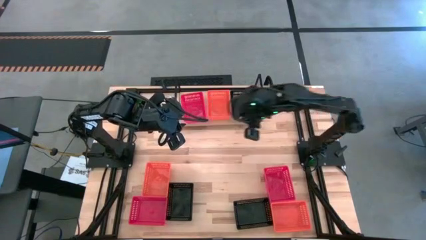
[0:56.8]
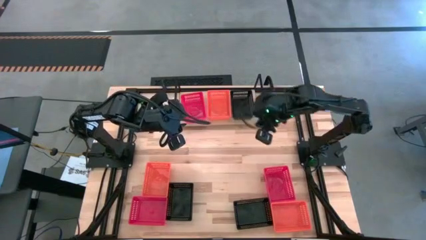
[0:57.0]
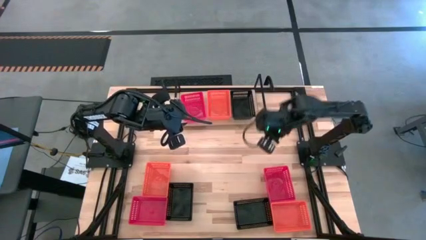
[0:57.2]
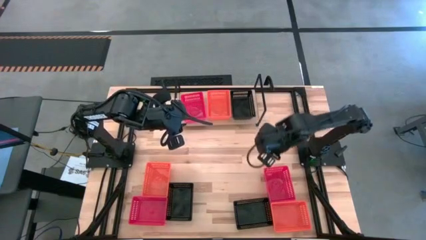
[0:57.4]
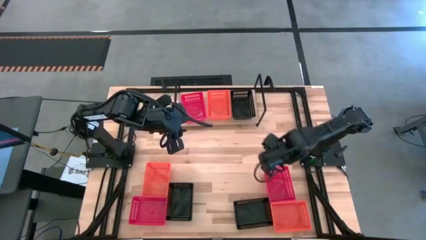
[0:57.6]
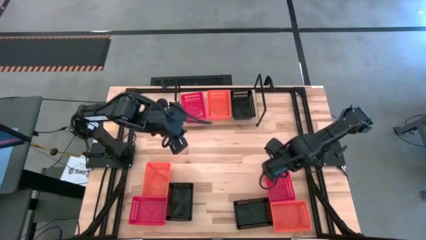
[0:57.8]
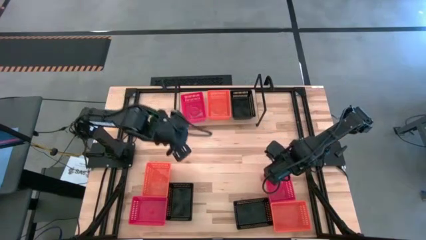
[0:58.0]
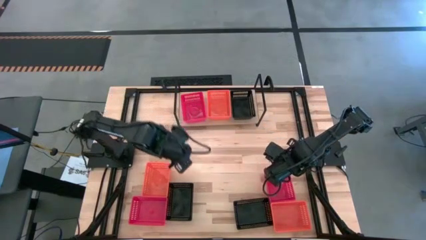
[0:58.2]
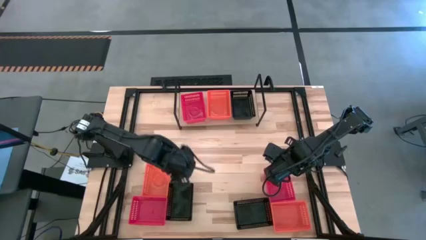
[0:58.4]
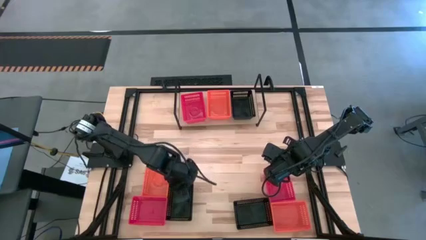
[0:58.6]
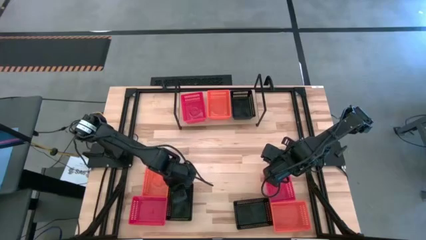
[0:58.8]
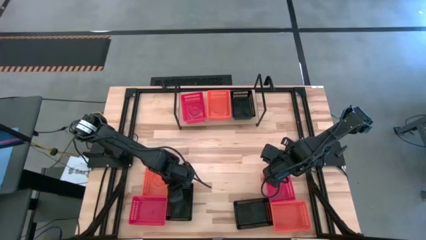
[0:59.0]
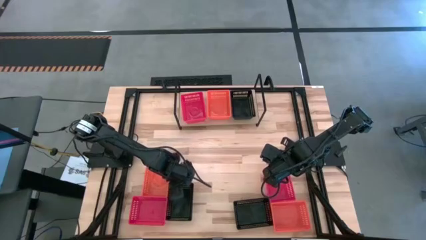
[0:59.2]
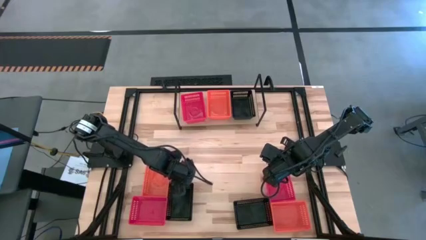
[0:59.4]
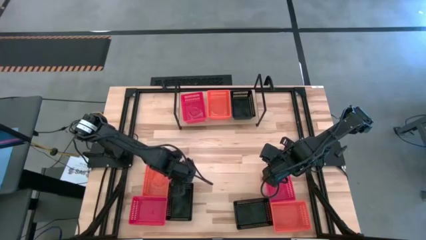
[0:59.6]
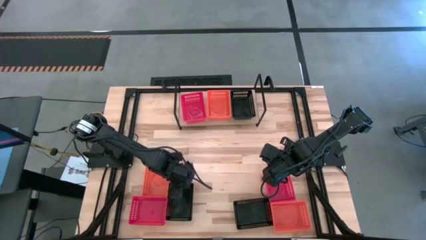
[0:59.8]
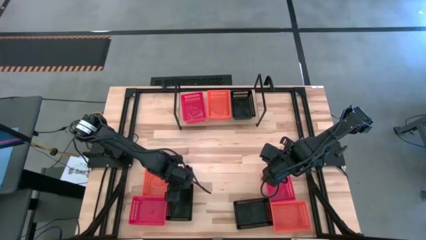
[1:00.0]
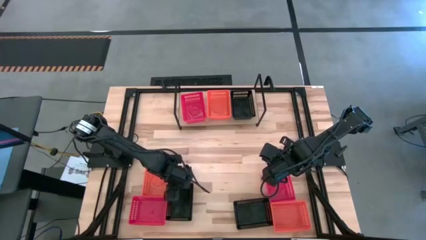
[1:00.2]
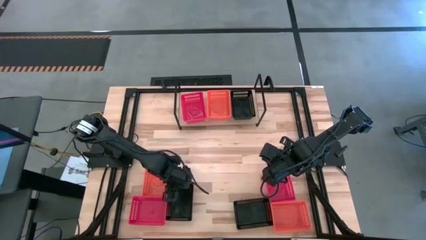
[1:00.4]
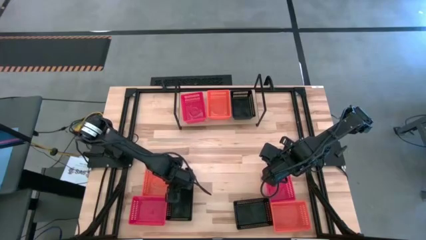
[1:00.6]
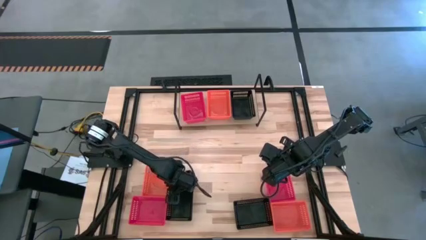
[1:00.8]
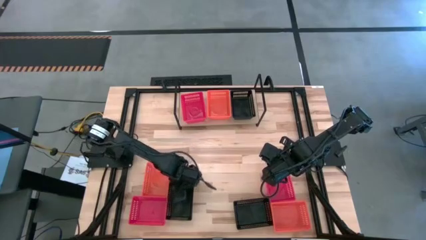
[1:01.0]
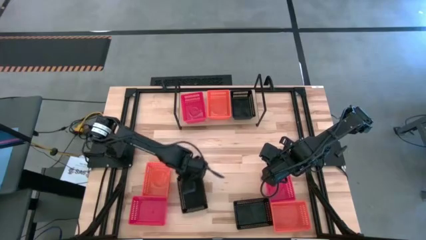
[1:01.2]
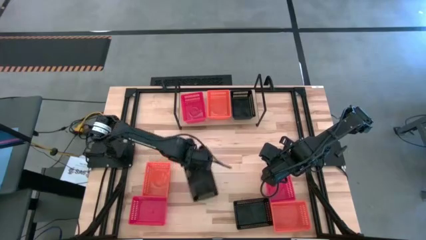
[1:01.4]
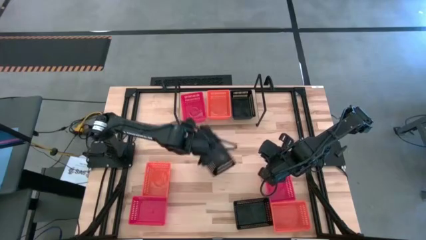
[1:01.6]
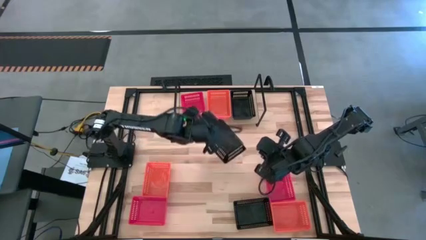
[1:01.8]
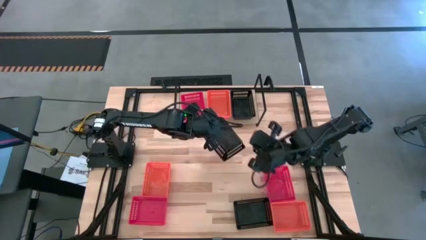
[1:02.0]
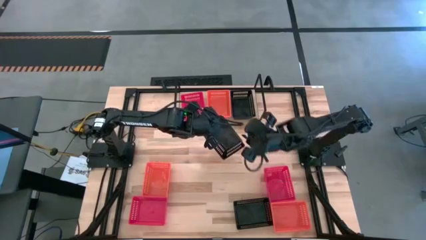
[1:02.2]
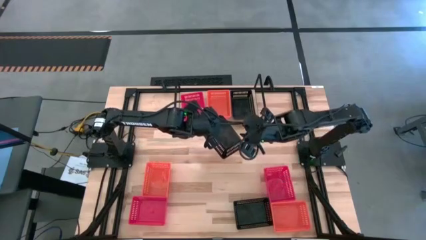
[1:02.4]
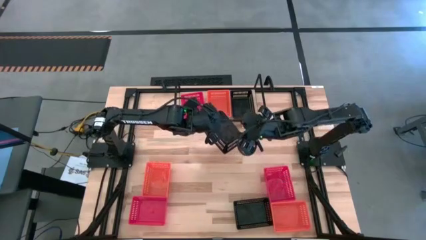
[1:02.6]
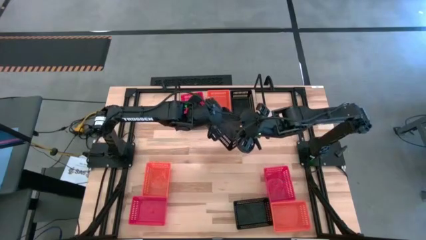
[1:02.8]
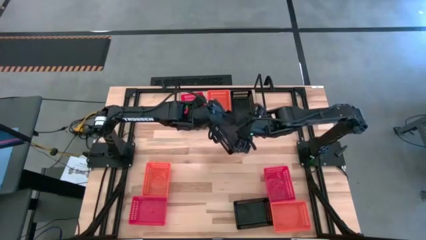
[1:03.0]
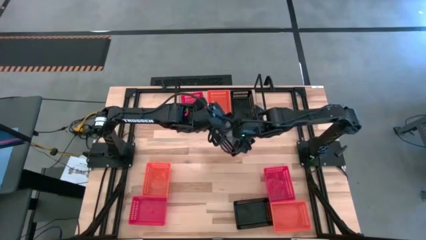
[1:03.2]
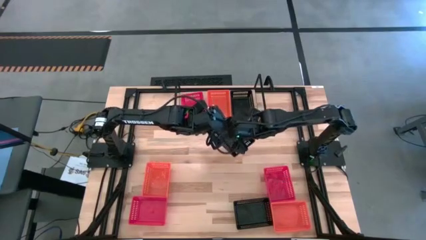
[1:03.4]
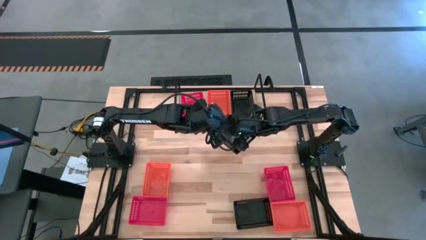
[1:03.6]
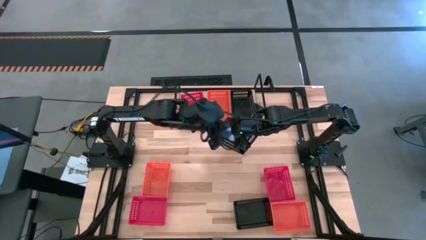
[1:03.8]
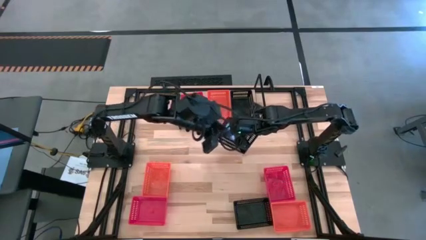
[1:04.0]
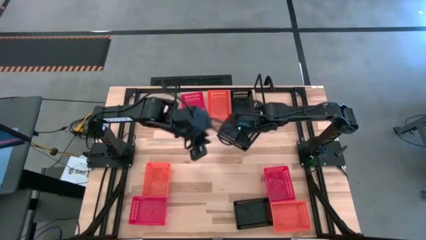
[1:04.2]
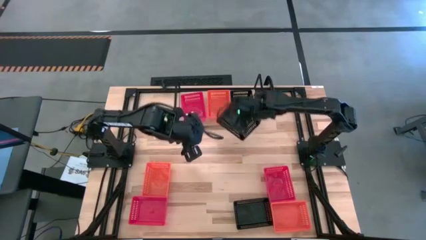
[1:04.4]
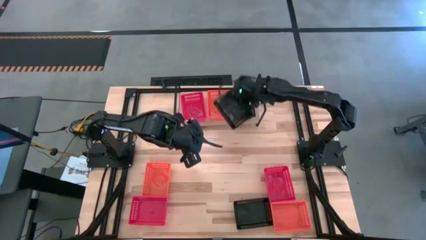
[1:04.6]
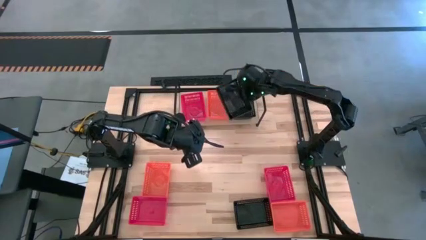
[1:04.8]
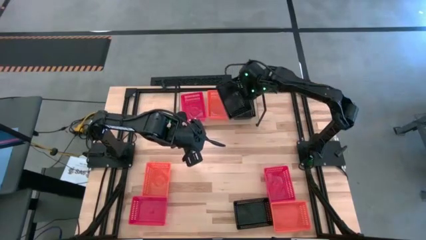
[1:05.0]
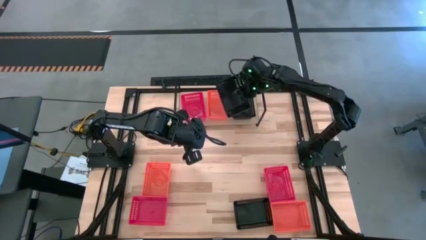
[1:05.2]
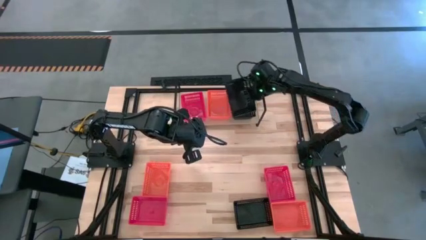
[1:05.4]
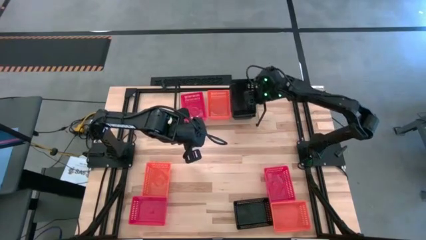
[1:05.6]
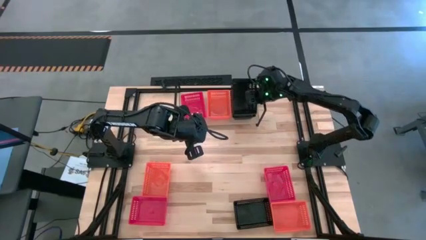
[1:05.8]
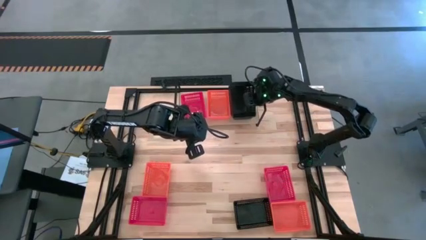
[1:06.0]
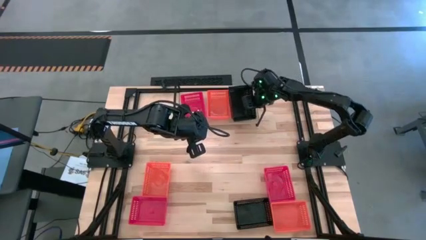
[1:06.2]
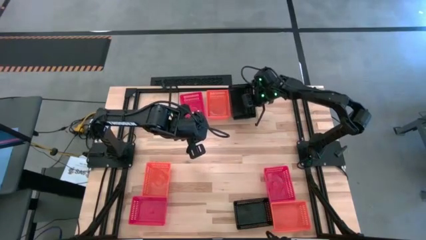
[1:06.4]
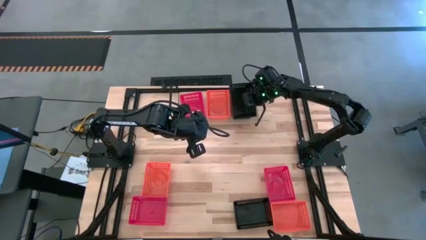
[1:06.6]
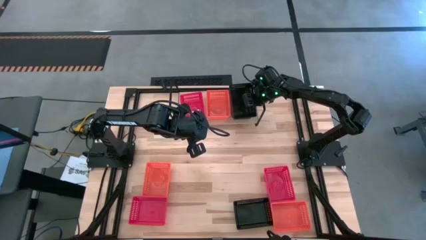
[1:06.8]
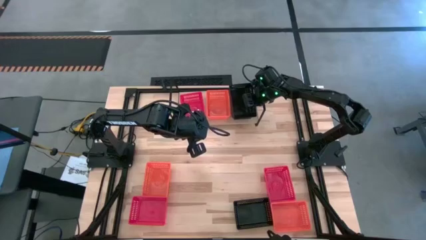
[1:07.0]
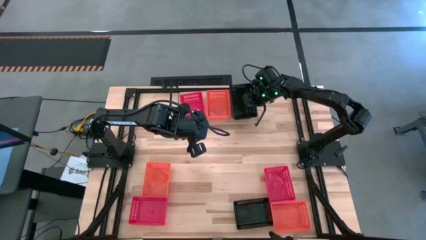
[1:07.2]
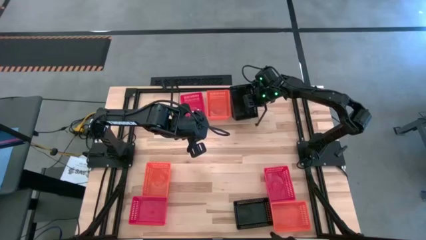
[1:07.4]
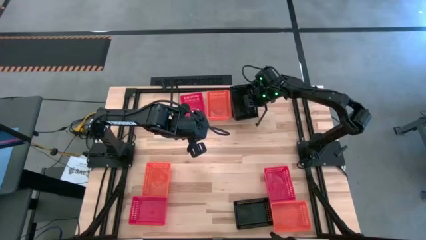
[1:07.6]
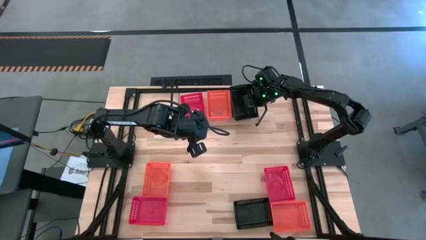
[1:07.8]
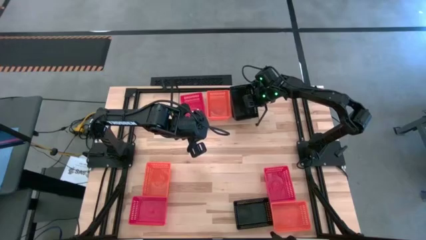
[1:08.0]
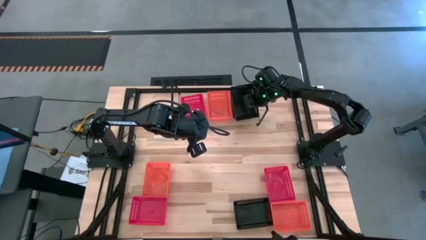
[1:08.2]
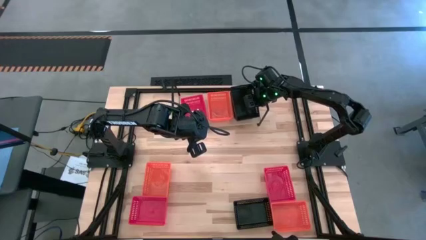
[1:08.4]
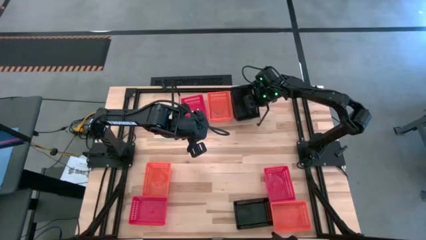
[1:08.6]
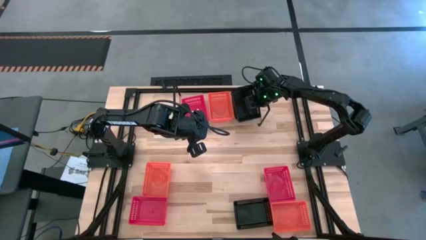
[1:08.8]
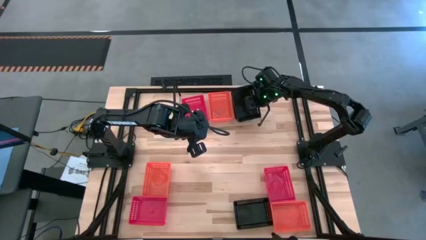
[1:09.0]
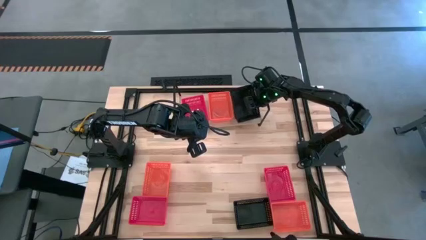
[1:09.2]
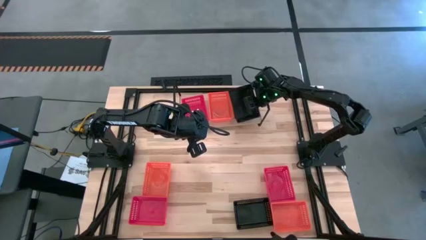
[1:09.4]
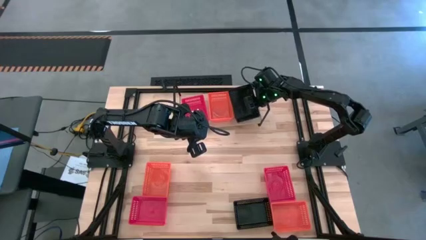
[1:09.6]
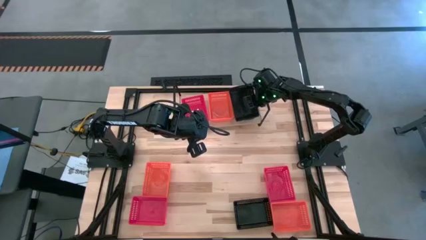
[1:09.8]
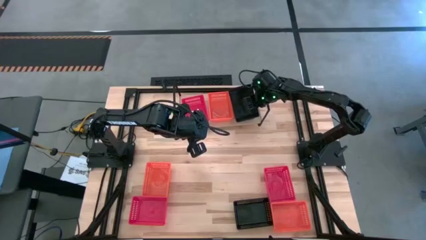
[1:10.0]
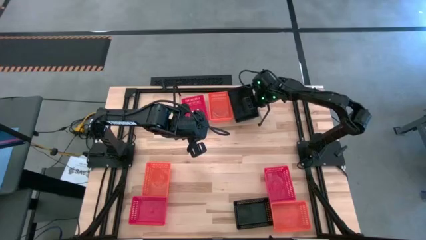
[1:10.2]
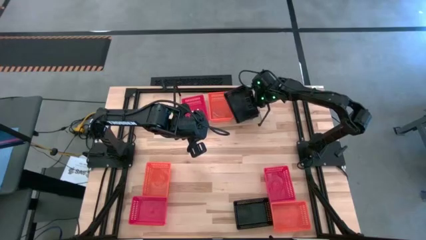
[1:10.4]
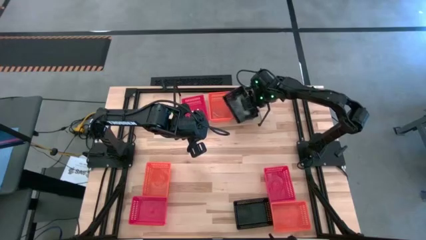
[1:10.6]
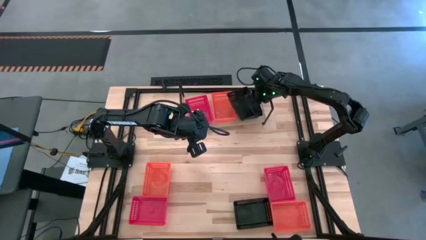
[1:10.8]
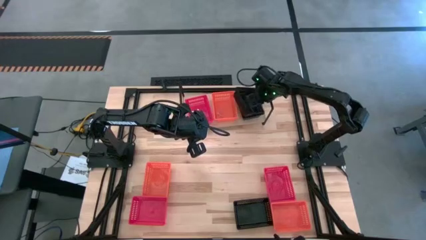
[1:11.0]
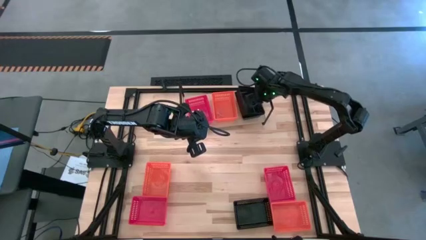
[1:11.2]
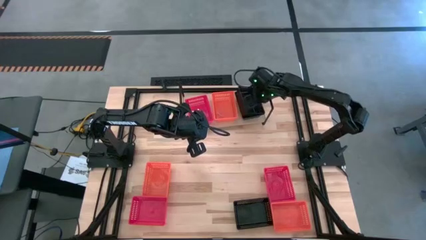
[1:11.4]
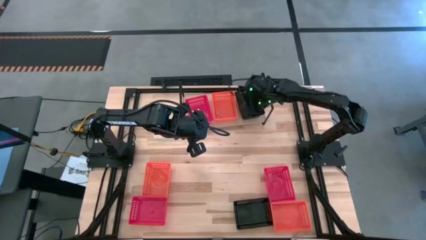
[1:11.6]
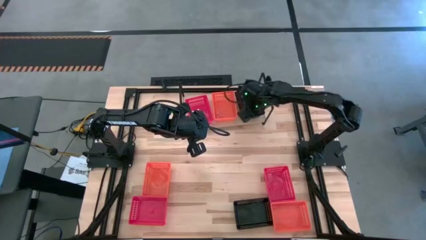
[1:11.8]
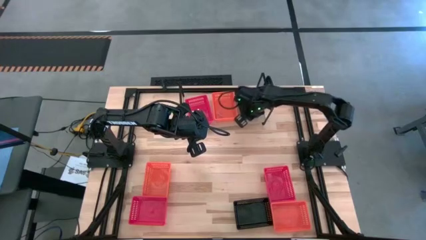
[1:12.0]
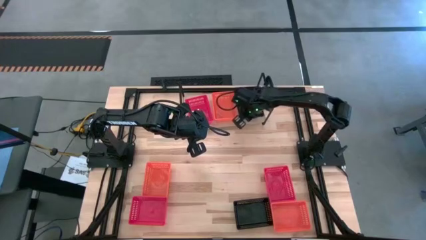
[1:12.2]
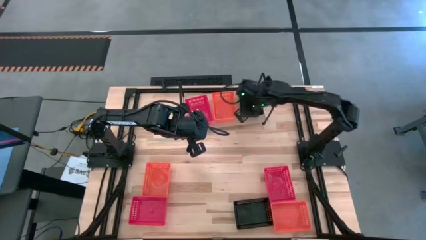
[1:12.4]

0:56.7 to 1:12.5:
Task: Stack baskets on shelf by color
Stack the left black bin into the black bin on the shelf
